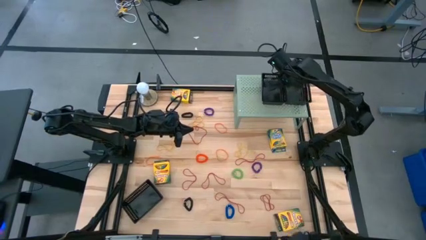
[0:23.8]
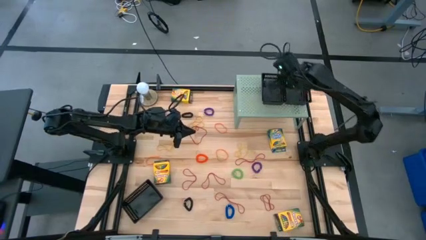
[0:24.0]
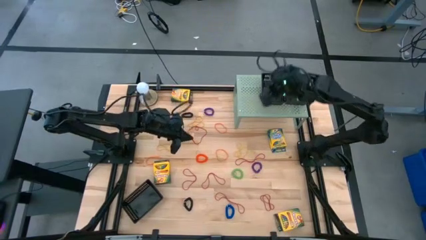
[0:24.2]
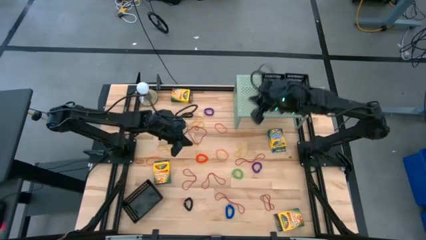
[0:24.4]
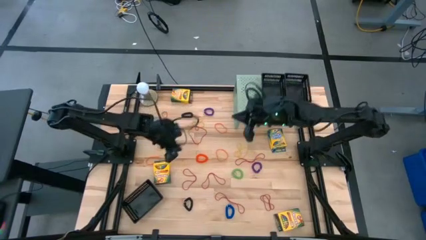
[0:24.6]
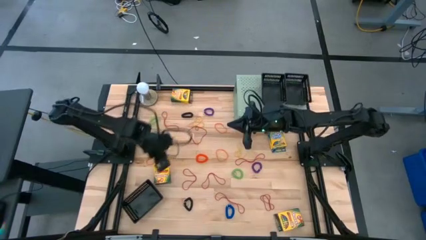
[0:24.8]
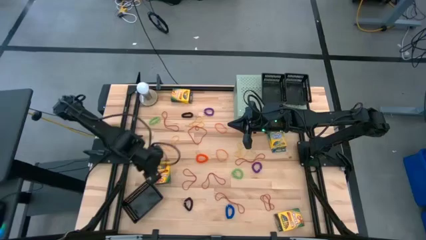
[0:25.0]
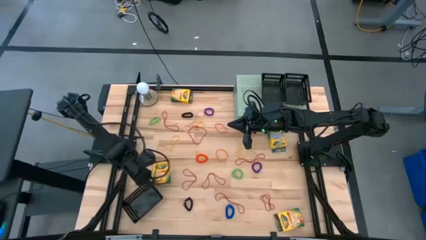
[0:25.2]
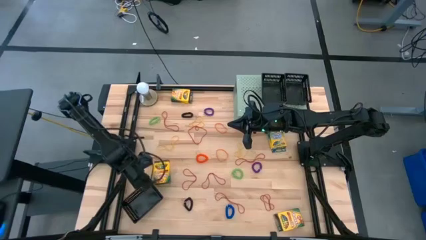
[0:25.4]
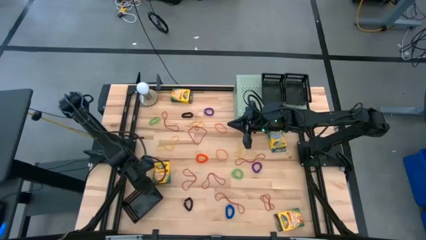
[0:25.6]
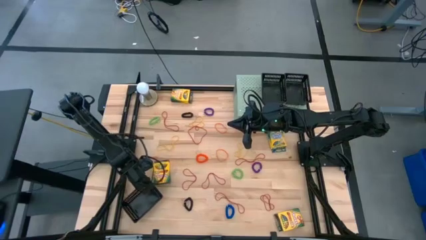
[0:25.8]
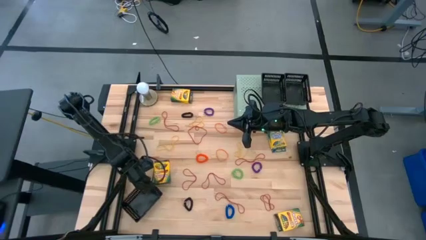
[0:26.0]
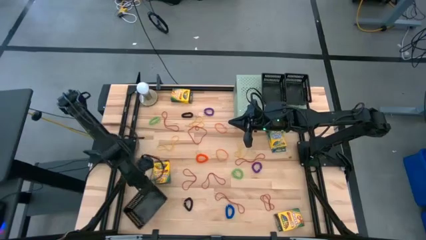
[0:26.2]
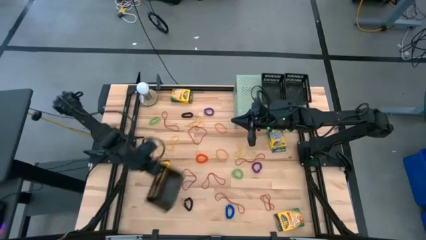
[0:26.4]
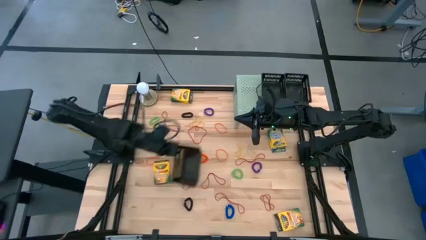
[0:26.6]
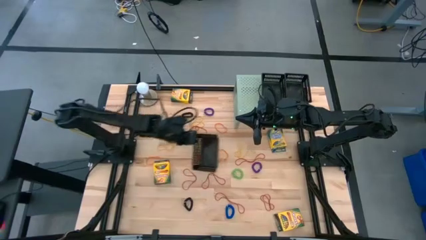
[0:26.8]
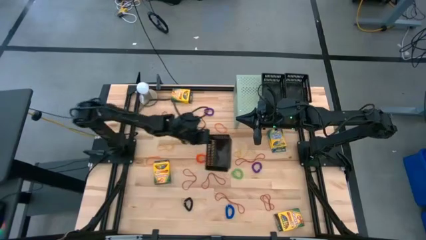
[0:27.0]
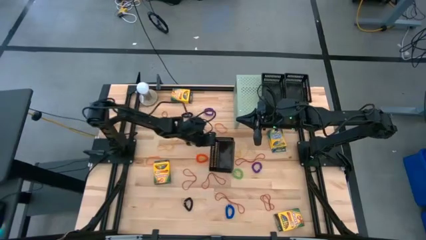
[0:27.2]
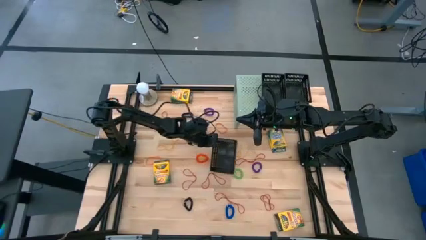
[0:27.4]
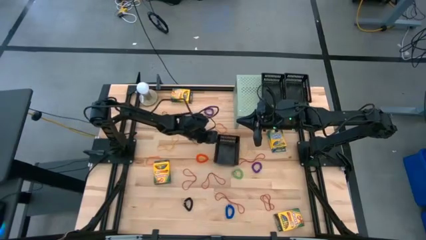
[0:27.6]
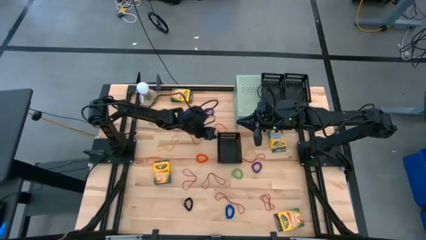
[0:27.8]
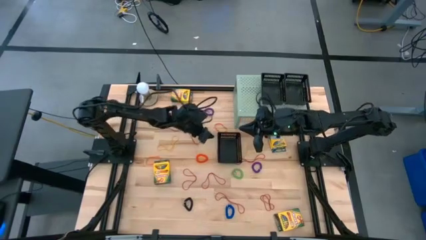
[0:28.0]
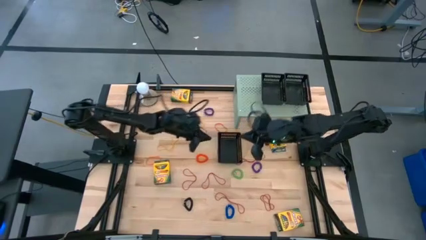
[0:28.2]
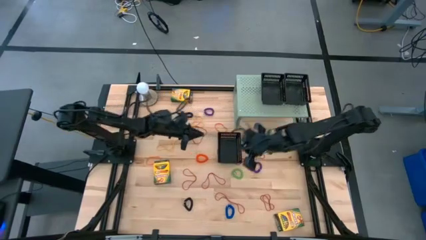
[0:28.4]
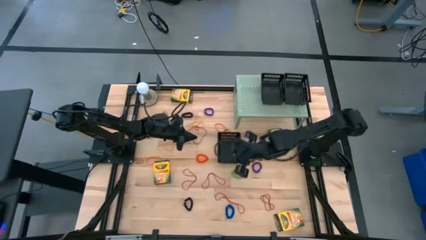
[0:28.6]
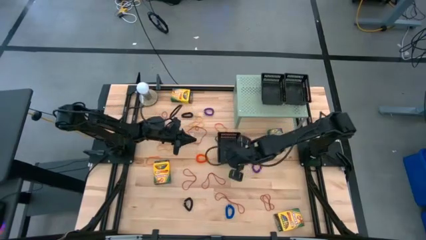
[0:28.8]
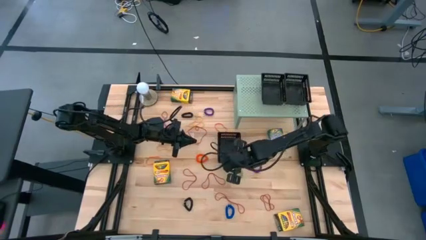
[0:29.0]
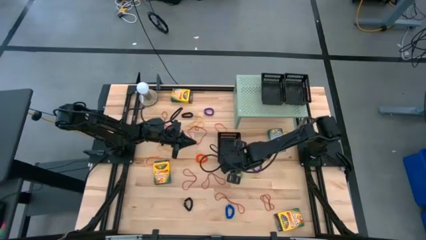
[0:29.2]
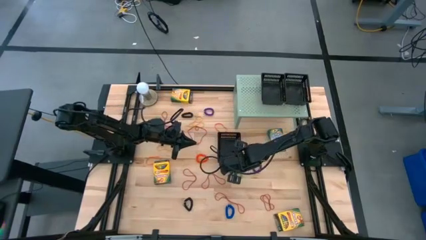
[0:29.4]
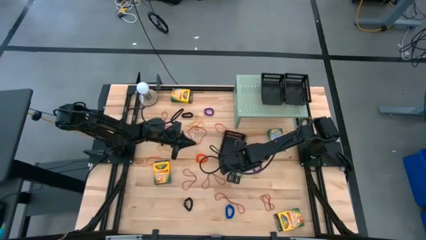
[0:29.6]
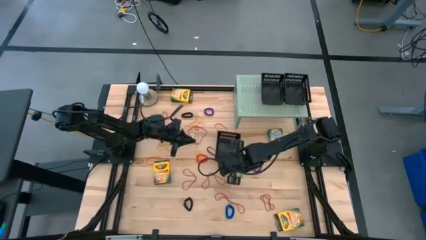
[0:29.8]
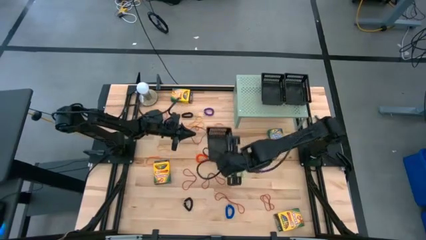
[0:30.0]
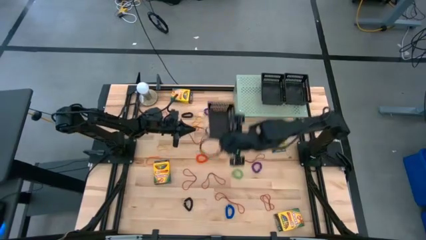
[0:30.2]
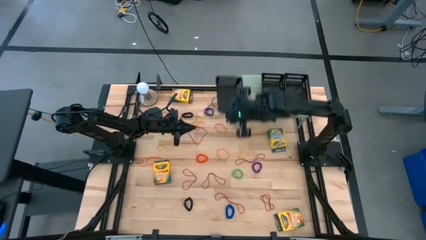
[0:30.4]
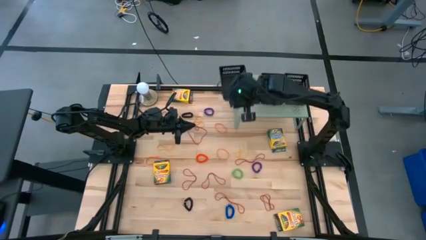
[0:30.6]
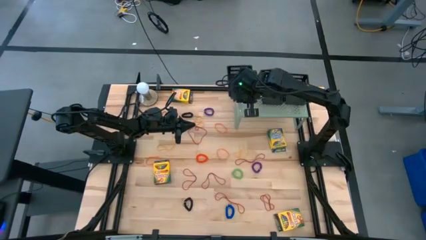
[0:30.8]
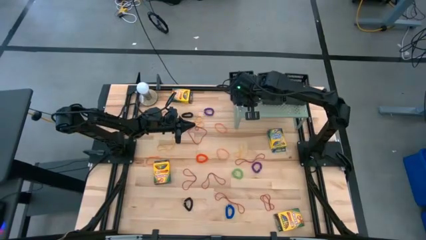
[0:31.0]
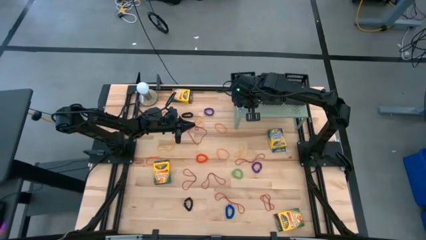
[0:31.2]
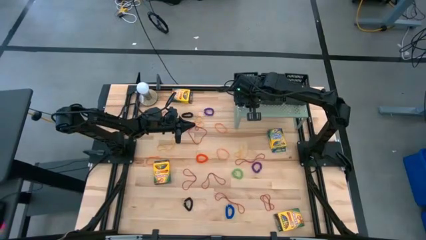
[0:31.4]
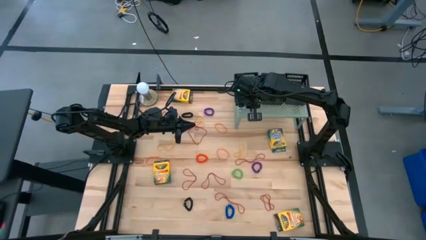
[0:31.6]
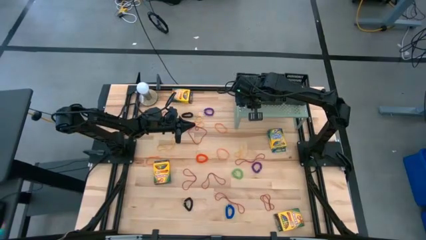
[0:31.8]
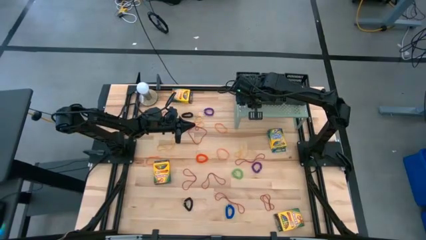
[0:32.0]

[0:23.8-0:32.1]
Task: Pick & Place Office Desk Supplies
Put the black basket on the shelf on the shelf

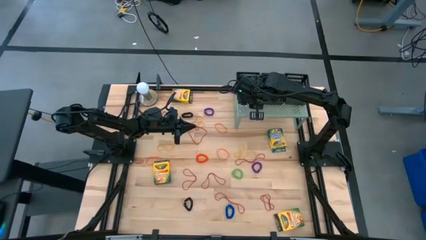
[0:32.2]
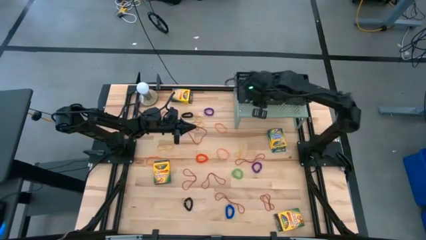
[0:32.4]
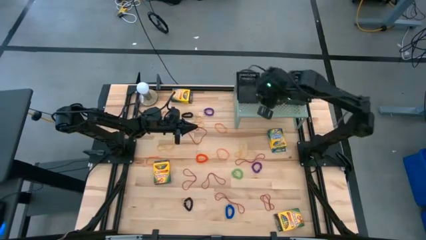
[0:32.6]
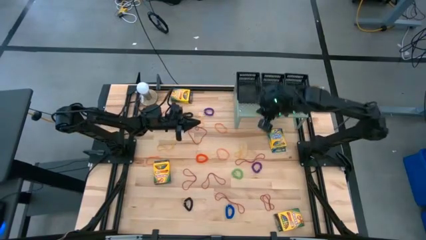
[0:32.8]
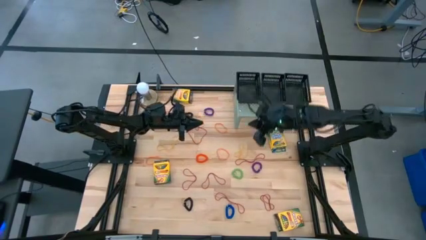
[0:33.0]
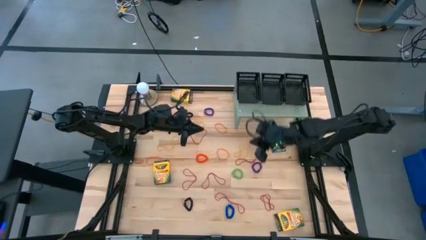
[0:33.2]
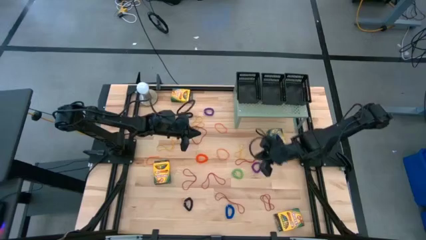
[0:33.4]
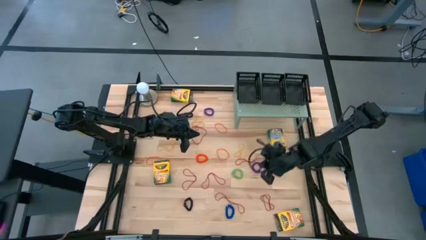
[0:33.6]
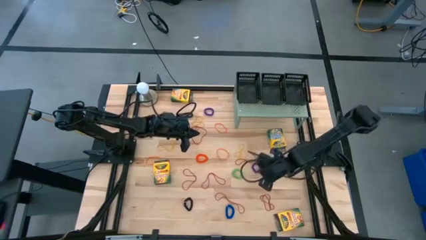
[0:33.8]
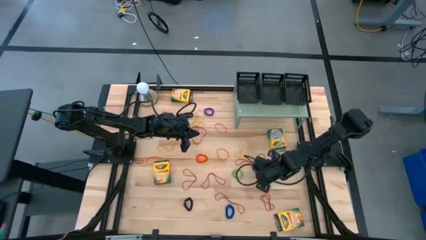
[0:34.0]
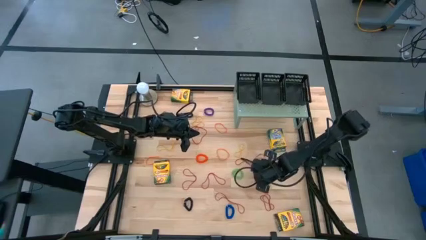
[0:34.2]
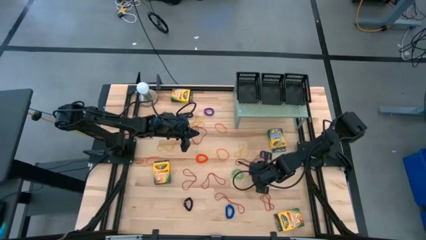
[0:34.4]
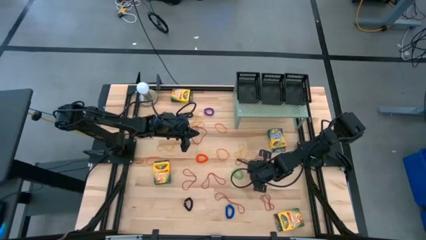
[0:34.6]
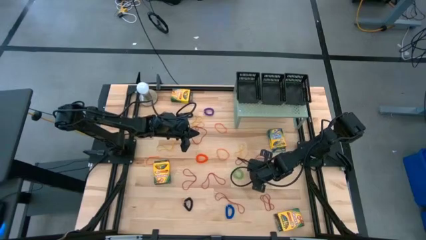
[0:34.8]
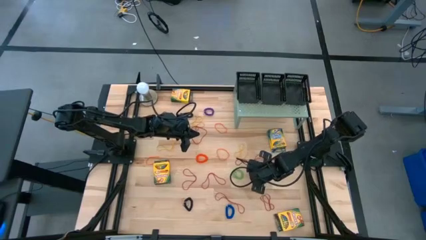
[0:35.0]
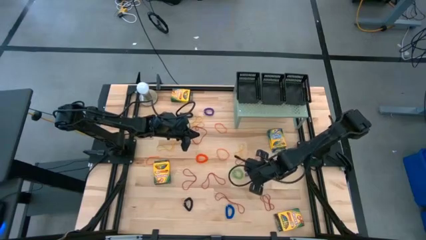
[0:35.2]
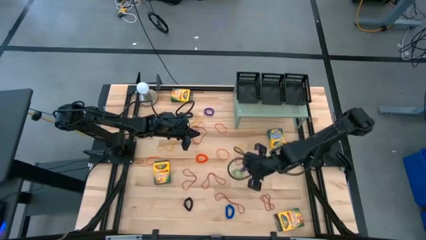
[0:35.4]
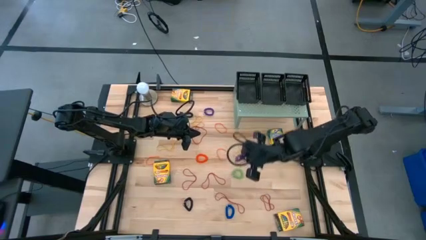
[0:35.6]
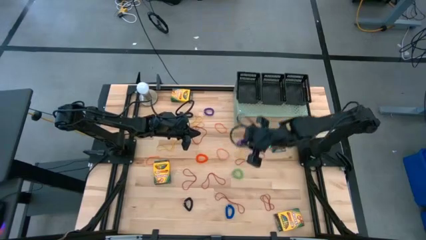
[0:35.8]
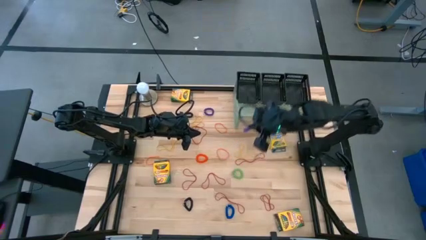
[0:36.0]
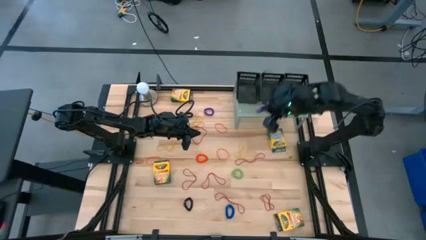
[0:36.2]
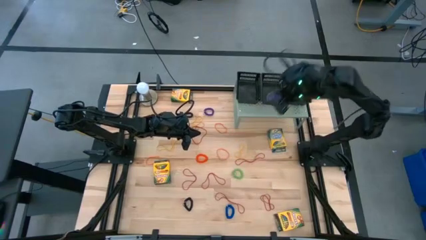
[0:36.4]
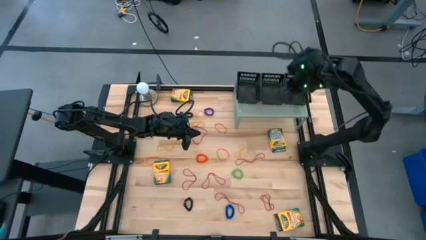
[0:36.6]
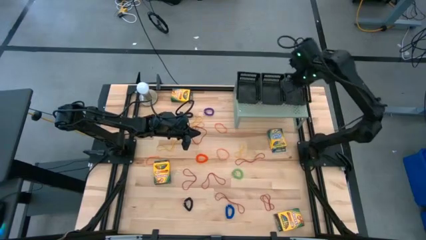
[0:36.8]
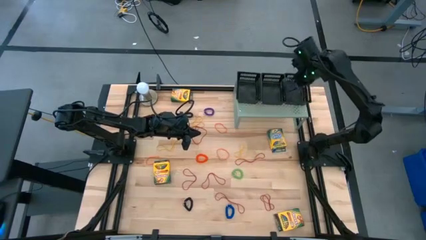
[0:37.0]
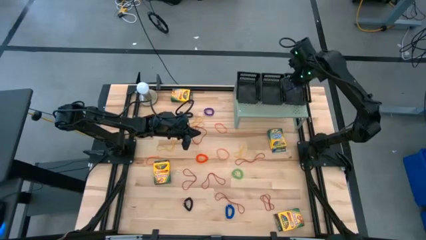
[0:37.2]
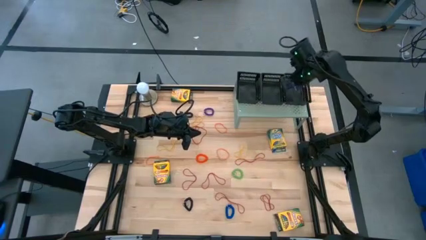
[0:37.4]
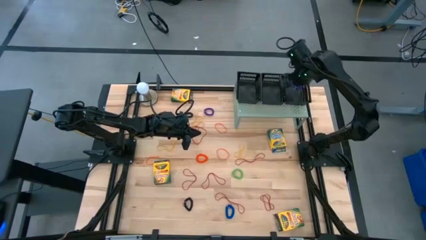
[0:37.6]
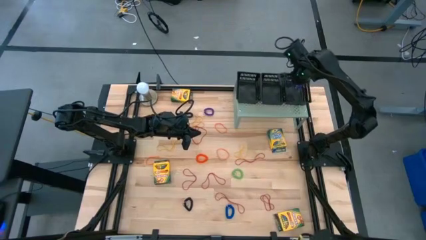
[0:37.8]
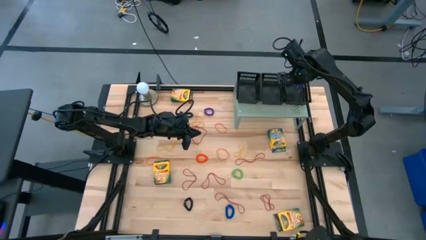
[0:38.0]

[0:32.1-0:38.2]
Put the bottom violet spring keychain into the right black basket on the shelf

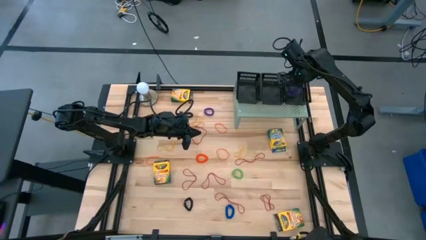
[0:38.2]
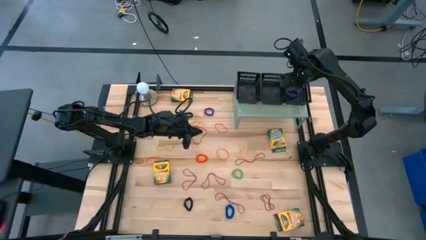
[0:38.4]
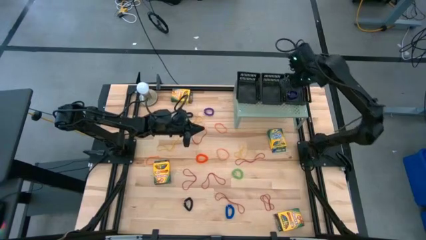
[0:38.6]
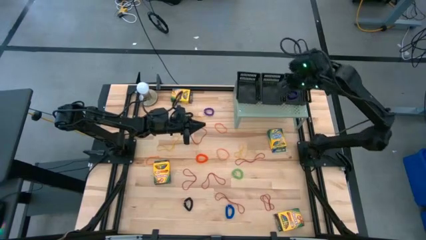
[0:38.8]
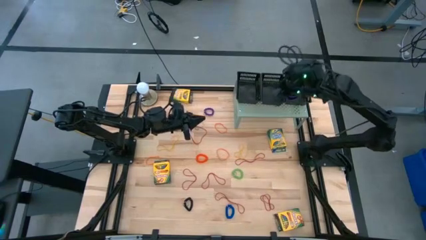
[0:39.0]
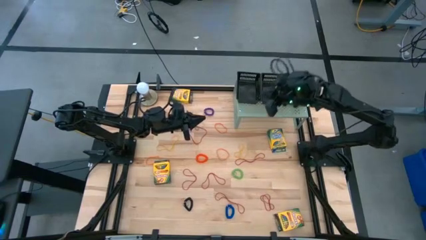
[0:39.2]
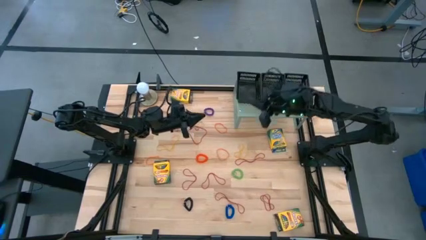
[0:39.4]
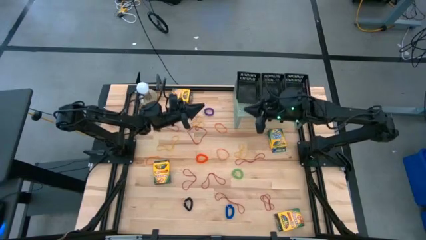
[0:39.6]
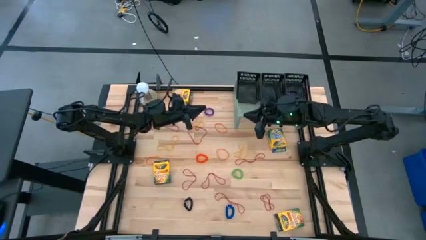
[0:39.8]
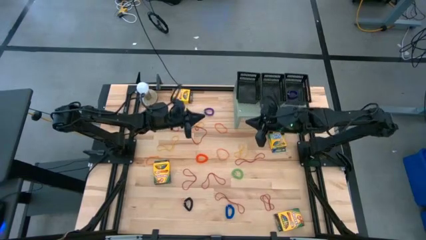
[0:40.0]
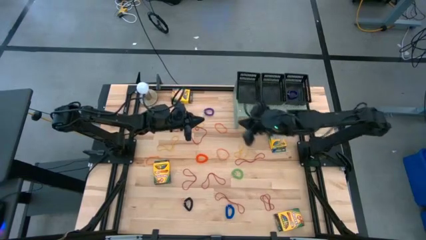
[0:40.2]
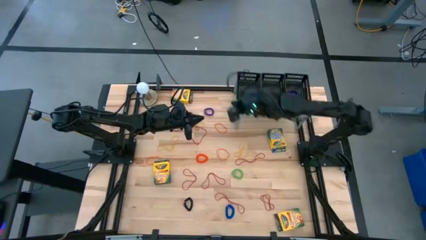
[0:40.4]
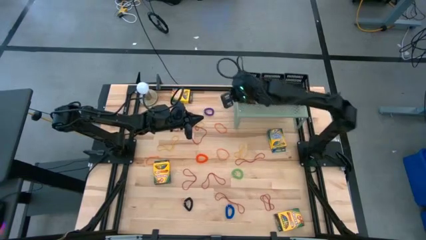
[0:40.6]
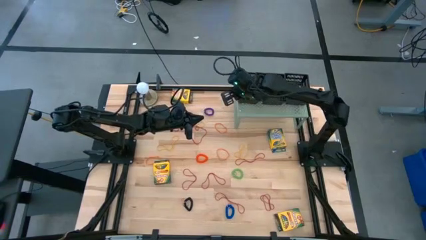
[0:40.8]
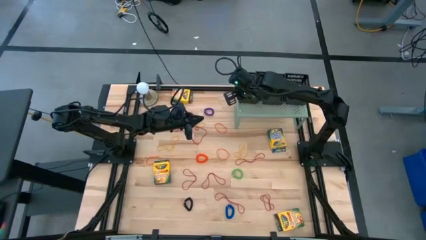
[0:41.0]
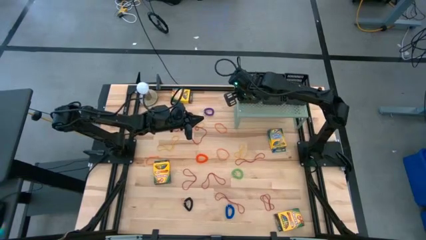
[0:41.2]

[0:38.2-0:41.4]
Adjust the left black basket on the shelf
